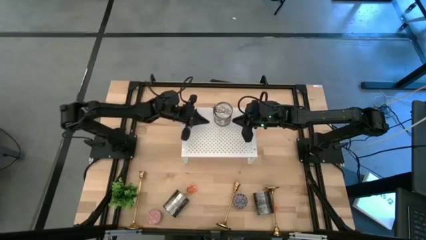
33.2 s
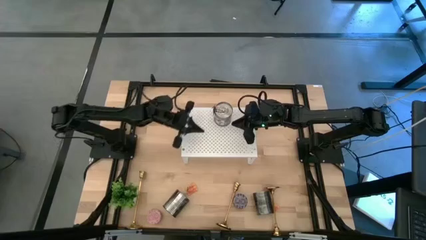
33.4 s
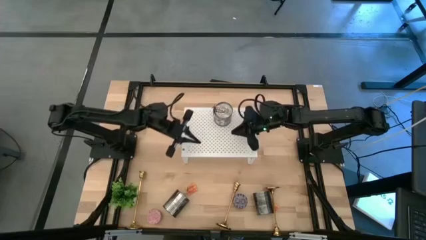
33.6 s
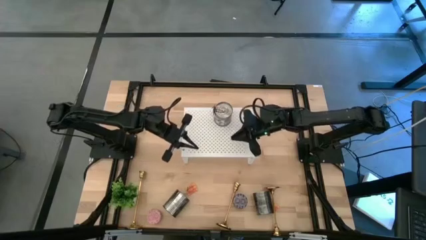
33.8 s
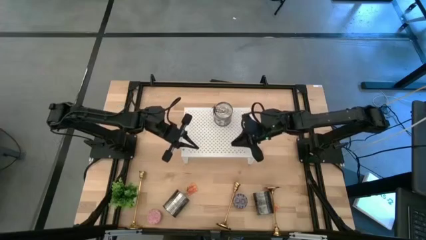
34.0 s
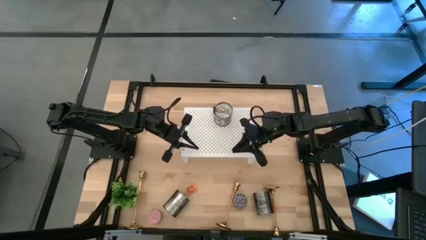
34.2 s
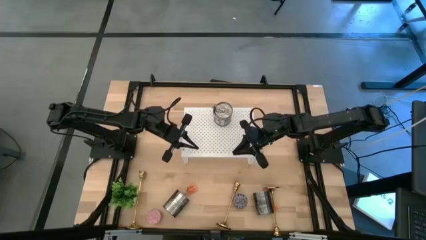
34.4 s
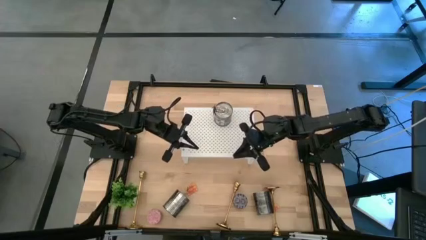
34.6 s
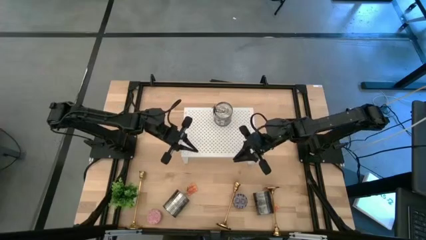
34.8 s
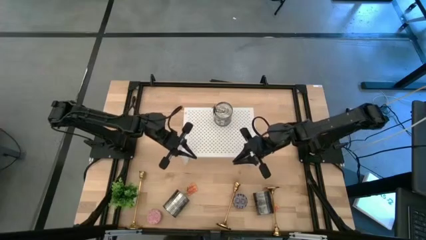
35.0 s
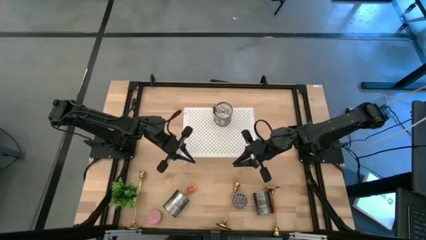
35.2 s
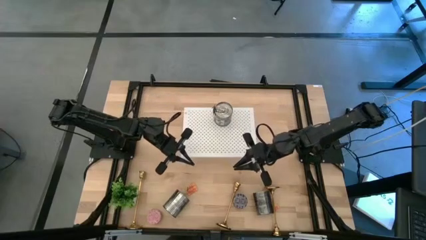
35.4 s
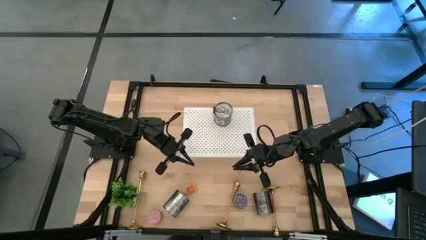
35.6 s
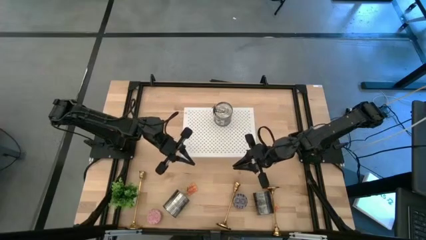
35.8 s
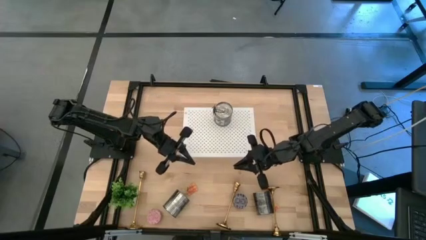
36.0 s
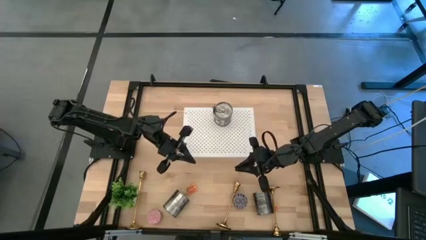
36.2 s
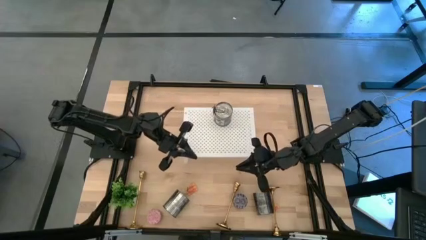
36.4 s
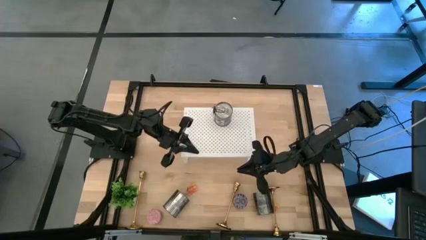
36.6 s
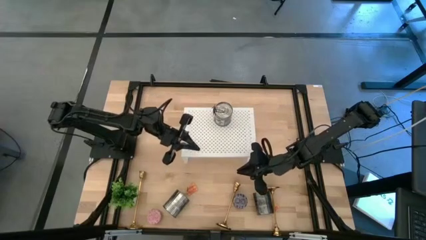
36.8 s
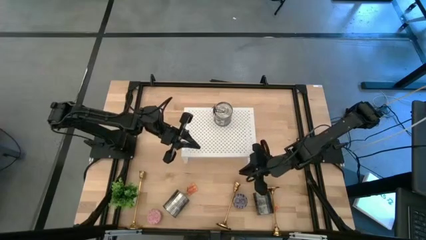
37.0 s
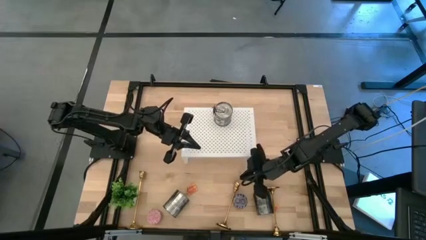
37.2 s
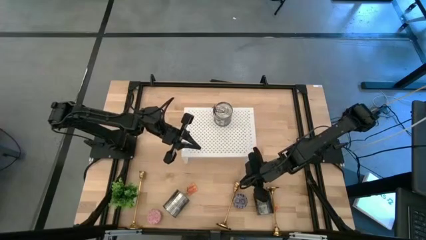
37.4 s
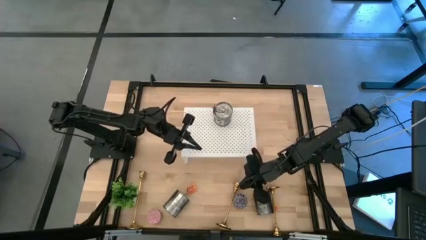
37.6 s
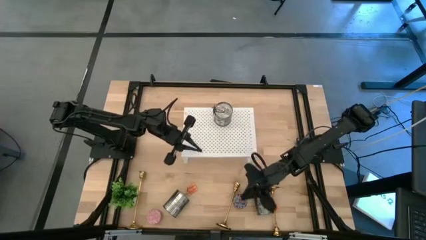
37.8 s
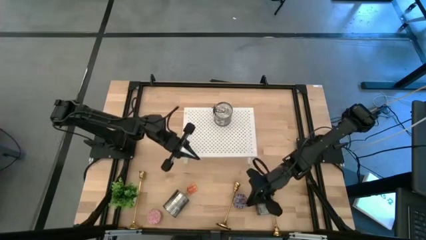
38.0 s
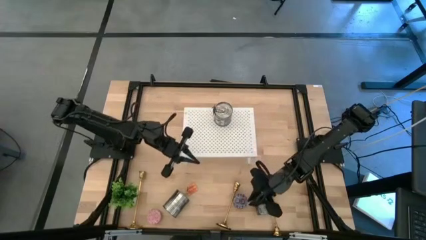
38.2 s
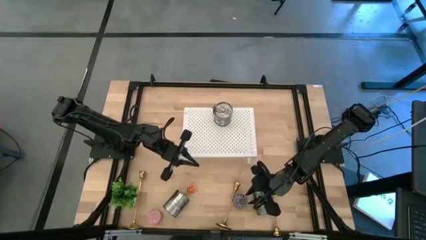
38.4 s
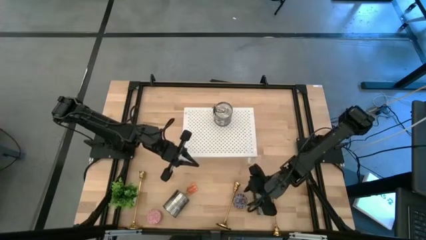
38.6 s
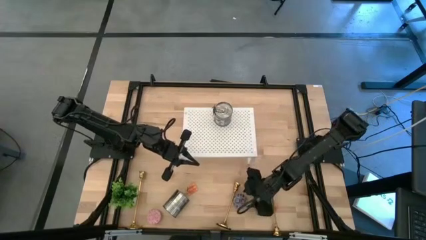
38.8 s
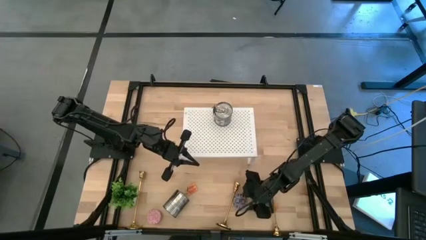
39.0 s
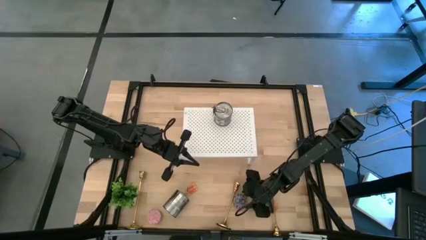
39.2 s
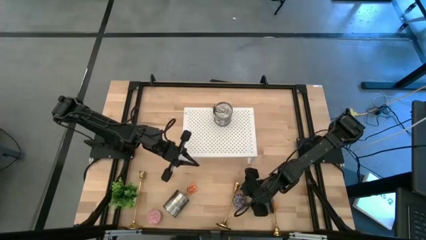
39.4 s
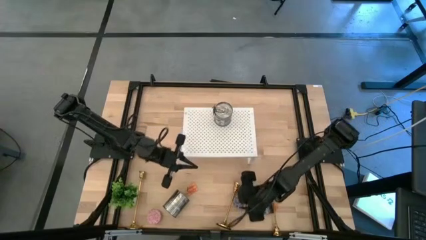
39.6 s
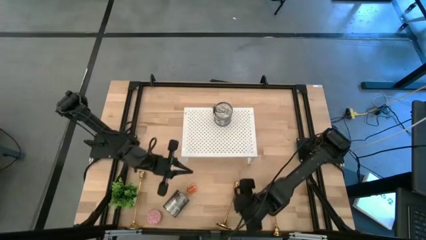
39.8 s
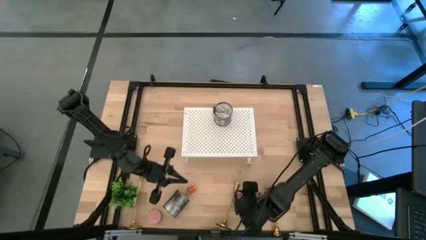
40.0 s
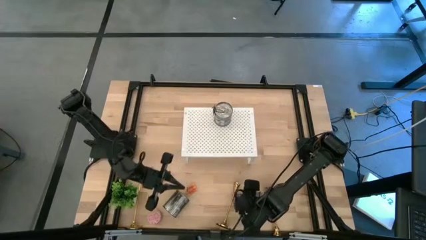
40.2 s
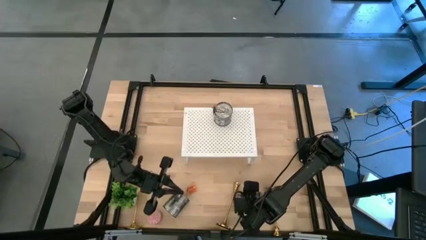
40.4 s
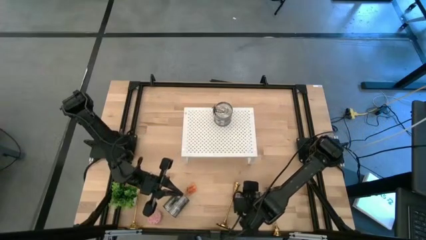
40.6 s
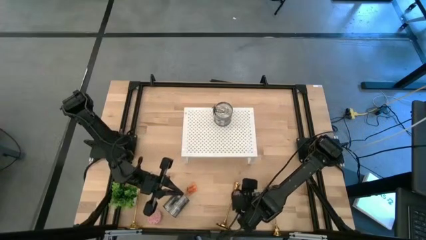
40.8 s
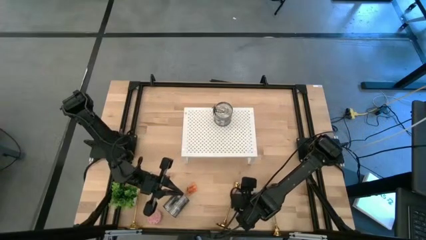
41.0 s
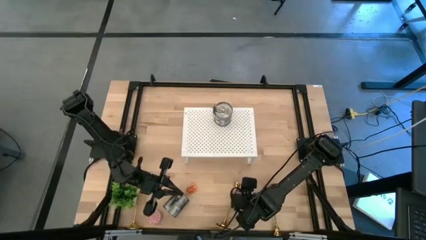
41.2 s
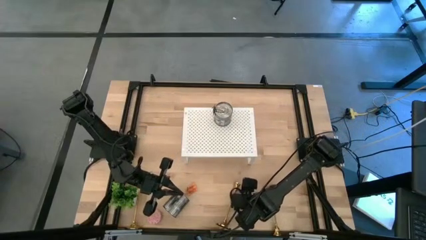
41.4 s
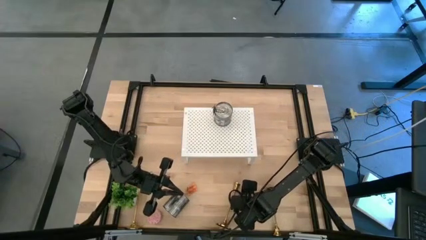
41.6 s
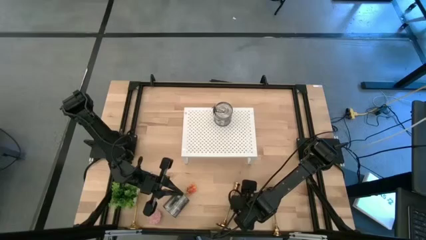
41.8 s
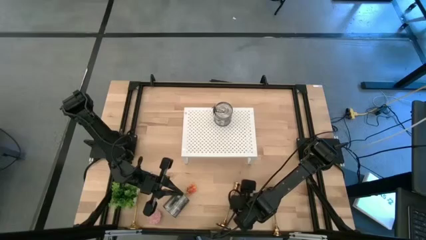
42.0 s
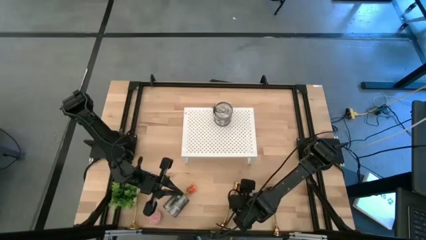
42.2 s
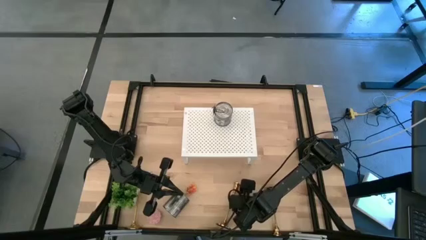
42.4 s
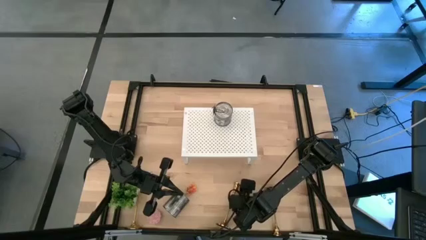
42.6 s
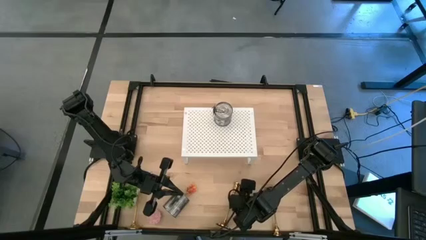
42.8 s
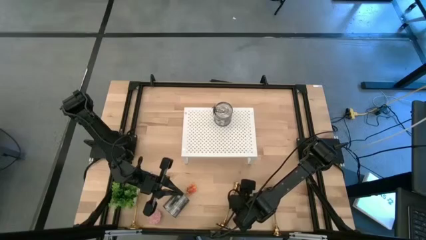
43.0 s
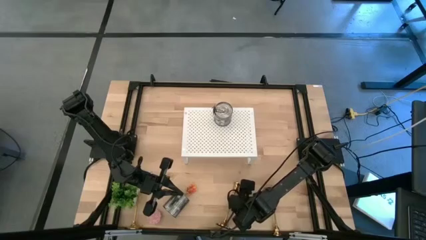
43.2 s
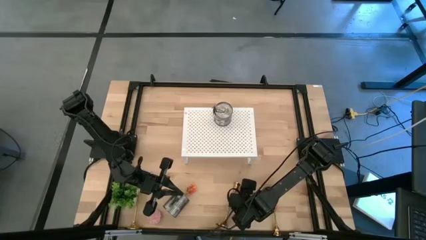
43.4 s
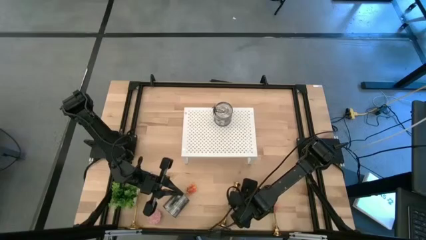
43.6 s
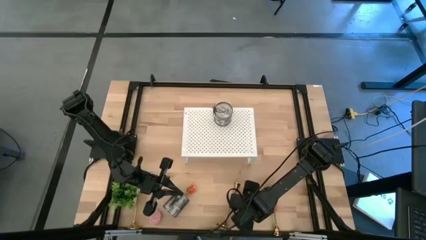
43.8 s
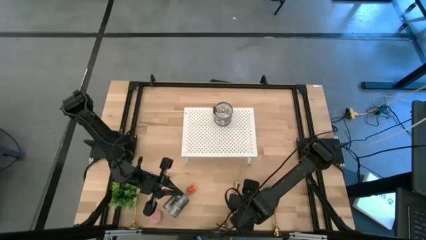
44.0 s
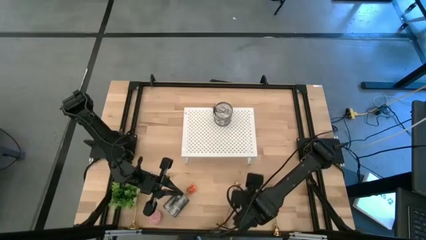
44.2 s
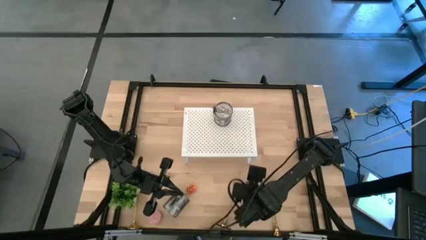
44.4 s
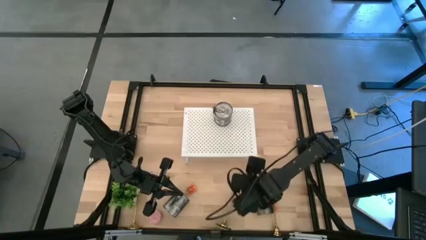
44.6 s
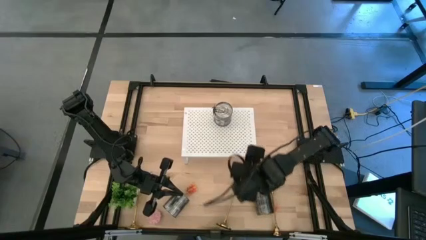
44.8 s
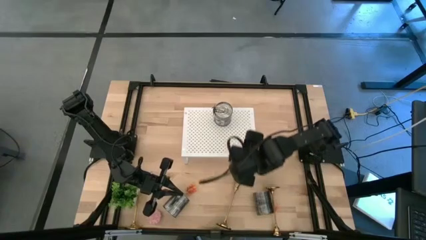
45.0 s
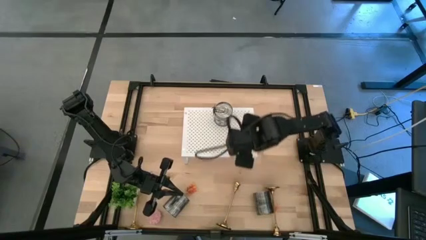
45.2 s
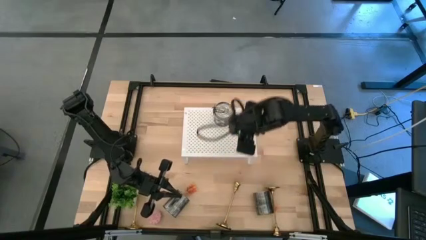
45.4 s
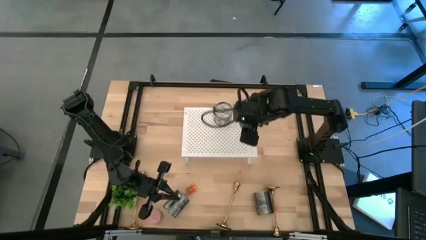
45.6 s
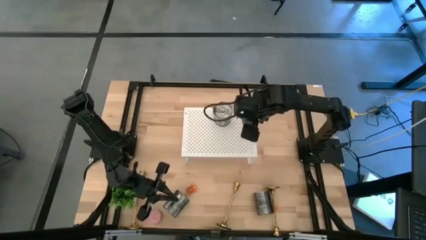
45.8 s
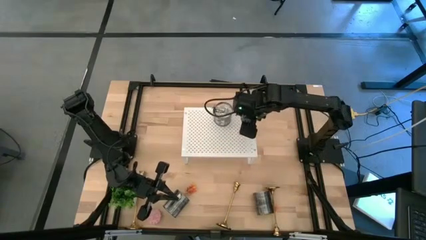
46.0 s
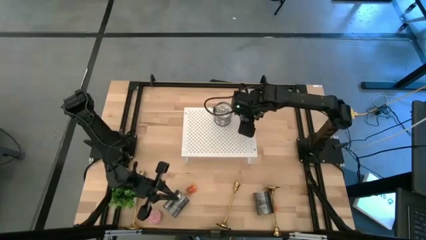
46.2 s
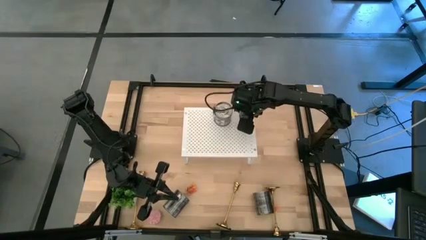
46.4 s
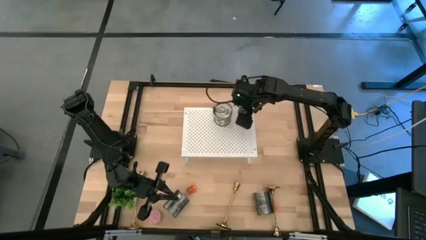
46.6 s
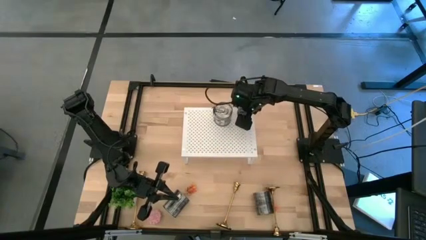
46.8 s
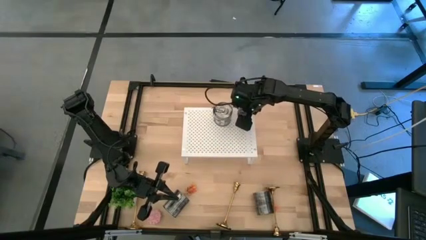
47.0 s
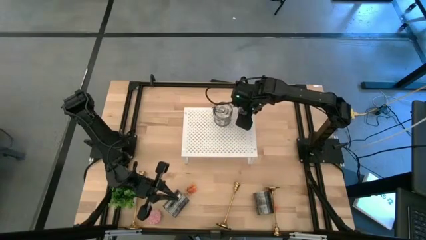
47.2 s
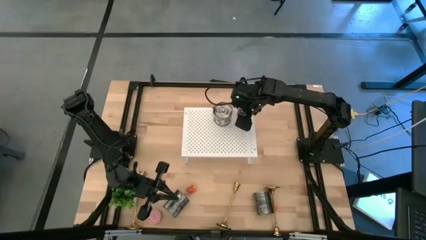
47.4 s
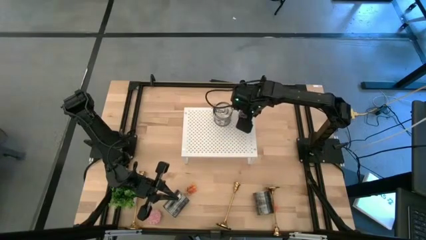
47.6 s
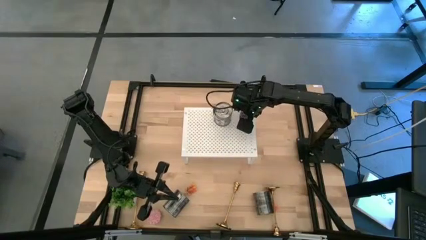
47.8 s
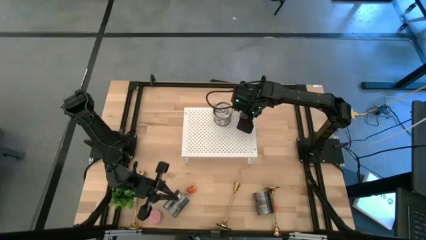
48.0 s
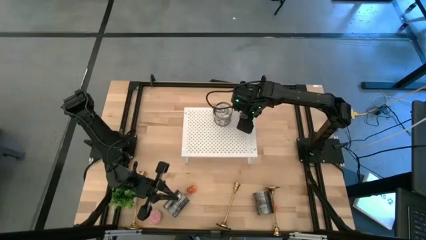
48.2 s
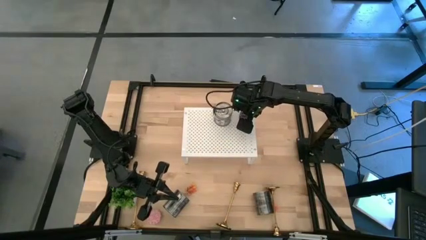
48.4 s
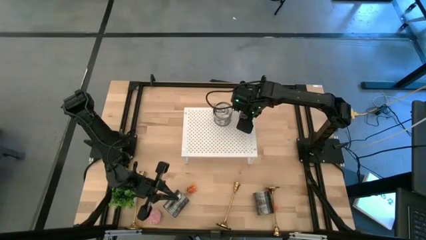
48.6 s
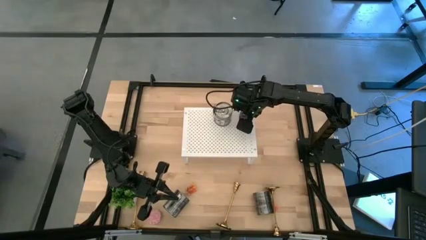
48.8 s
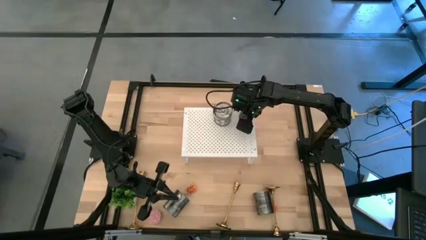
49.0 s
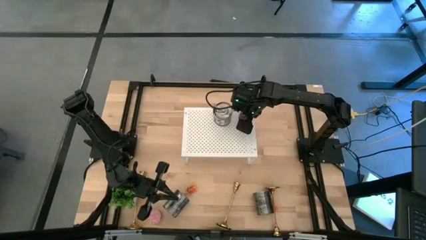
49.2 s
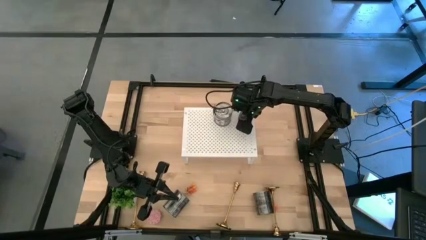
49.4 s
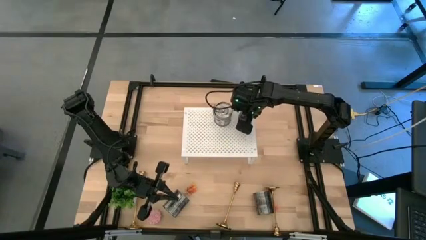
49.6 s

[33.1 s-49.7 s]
Task: Pick & Place candle stick holders
Put the small black scented candle on the shelf
